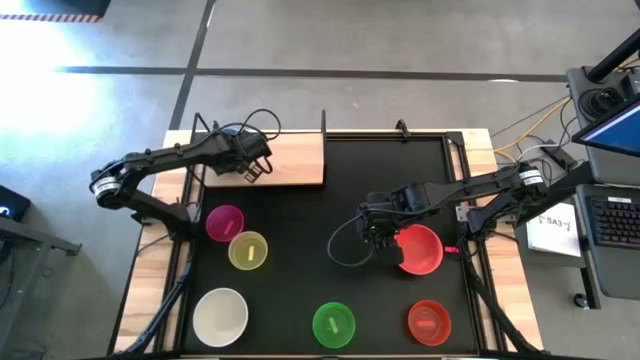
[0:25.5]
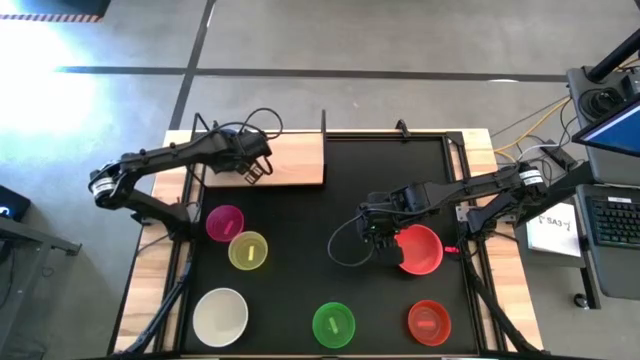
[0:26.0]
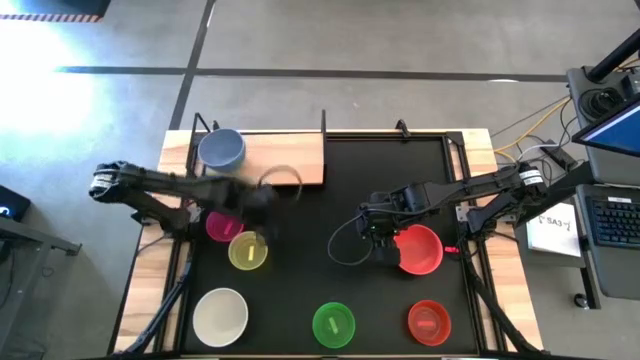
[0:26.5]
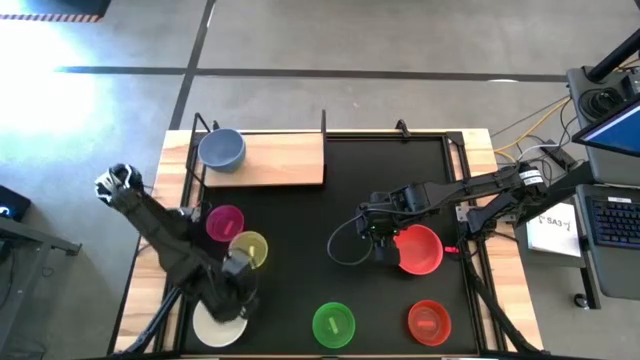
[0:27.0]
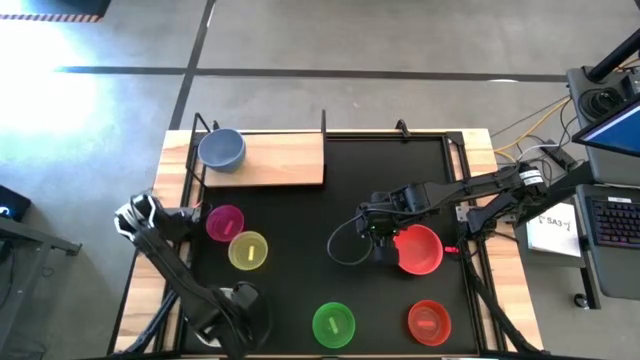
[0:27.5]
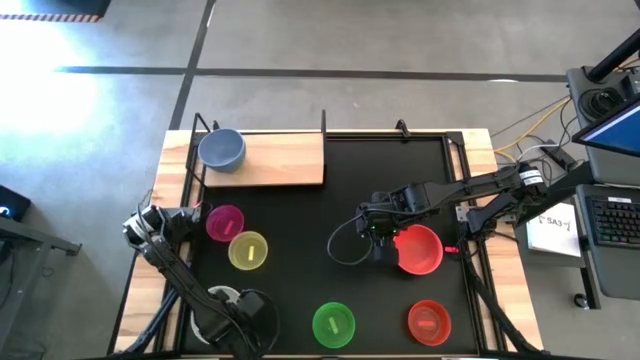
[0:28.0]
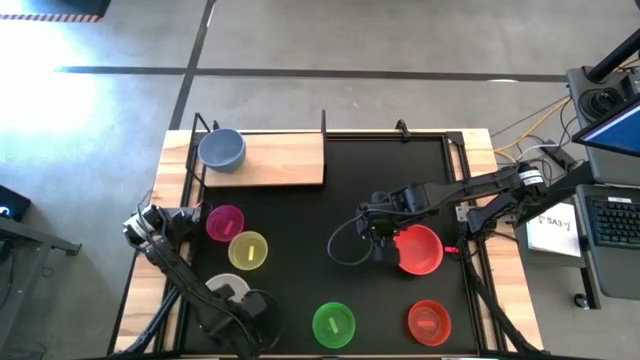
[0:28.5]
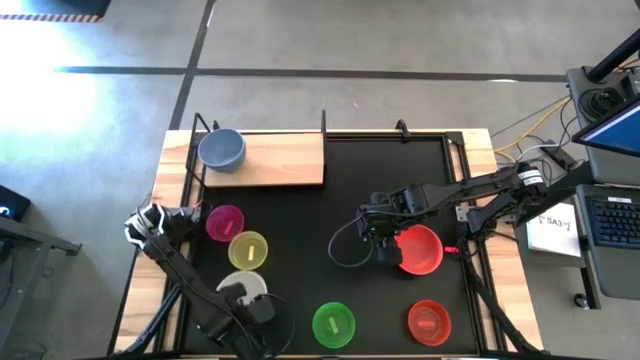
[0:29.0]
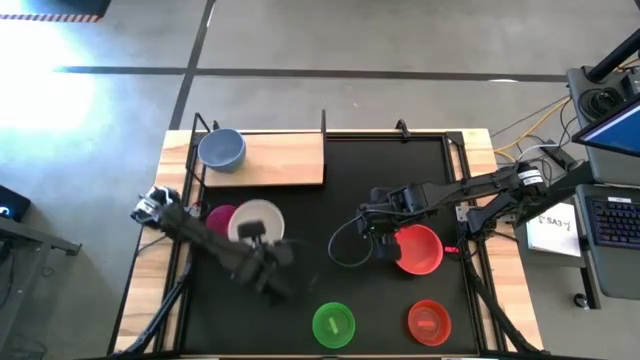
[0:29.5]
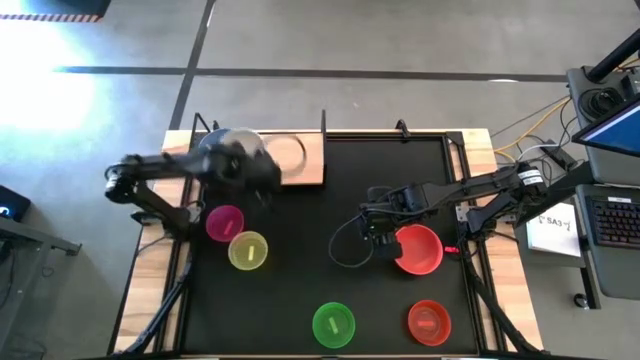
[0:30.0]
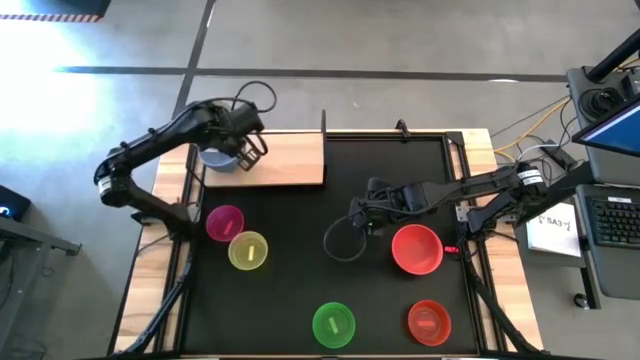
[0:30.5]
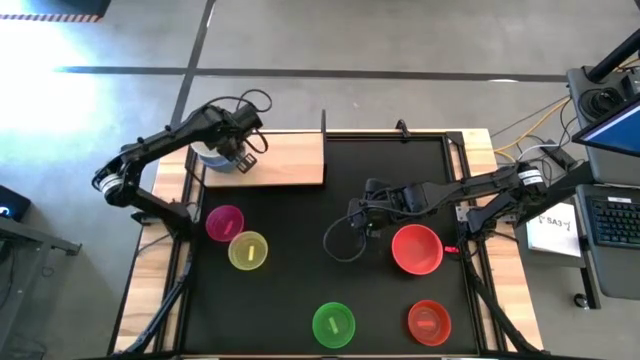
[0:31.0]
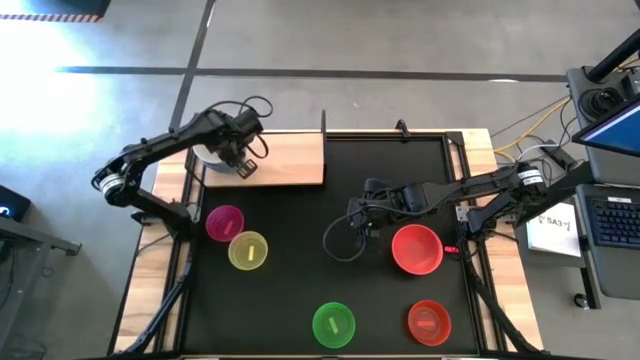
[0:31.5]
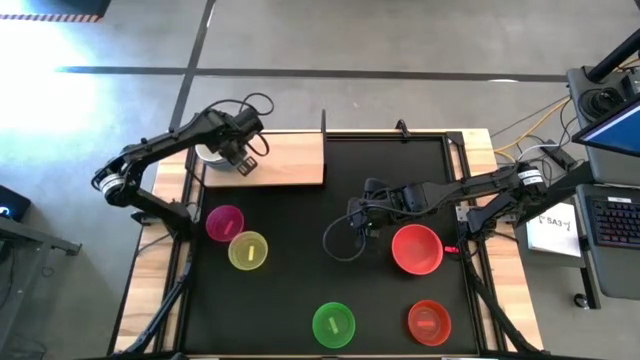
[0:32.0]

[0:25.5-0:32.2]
Task: Place and stack bowls onto a shelf
Stack the white bowl on the blue bowl on the shelf

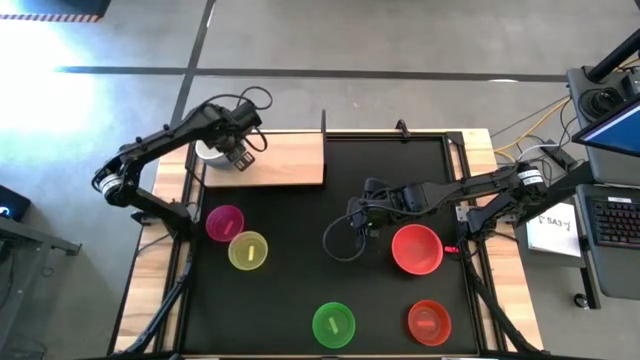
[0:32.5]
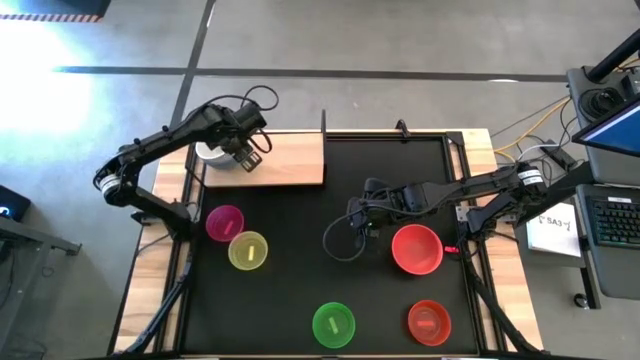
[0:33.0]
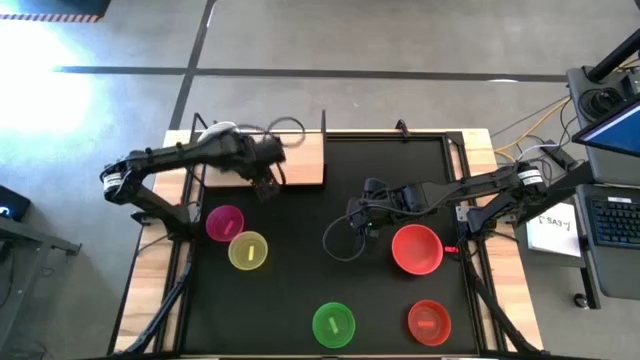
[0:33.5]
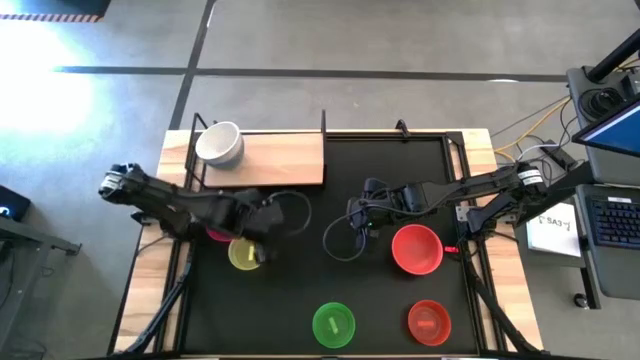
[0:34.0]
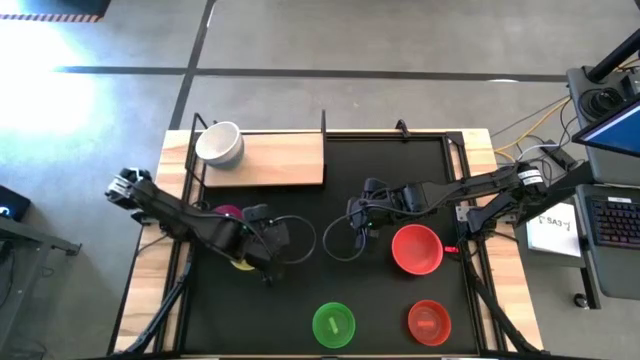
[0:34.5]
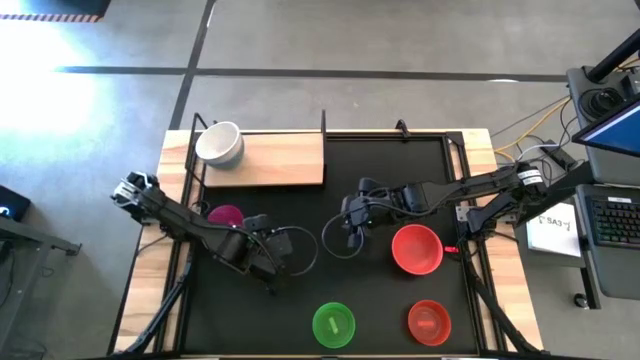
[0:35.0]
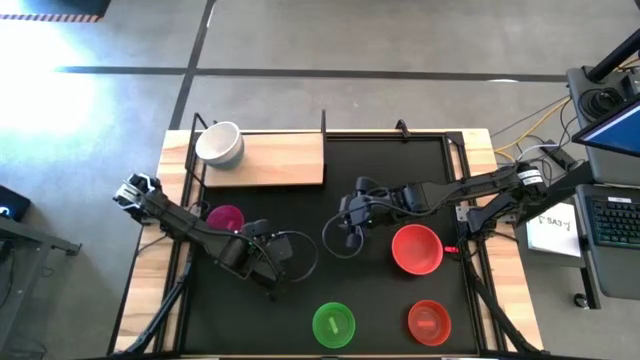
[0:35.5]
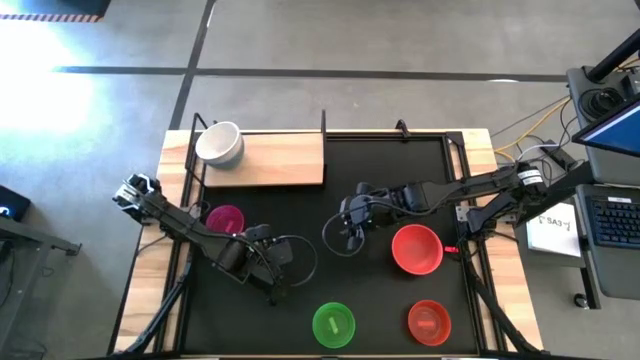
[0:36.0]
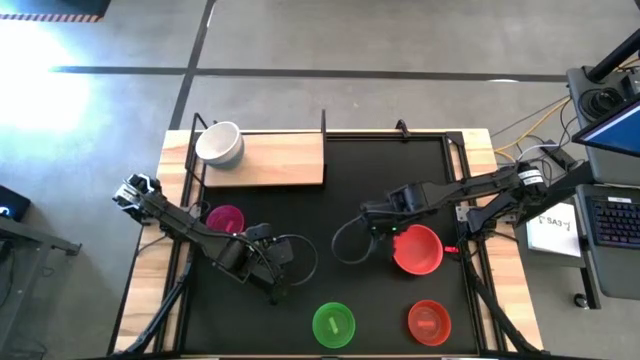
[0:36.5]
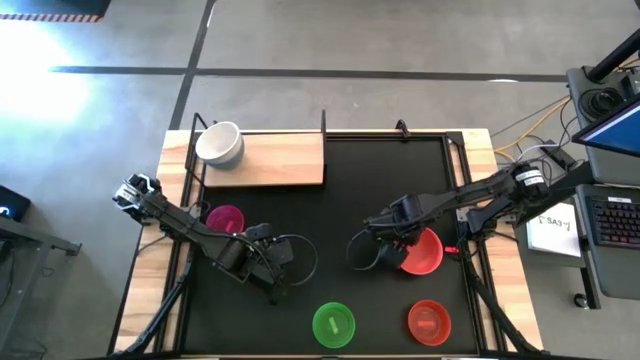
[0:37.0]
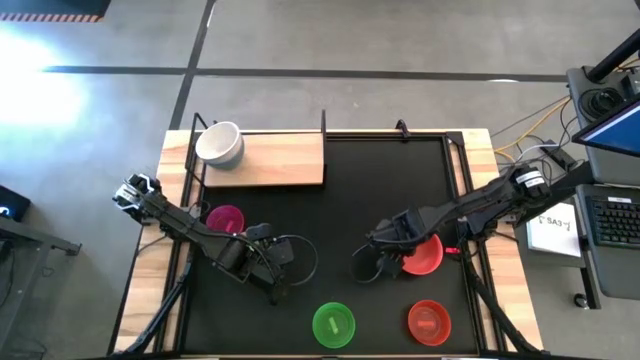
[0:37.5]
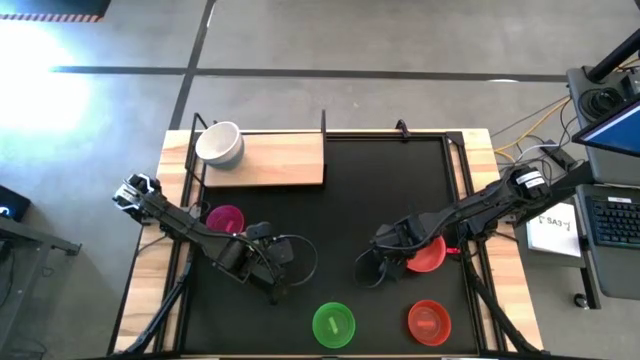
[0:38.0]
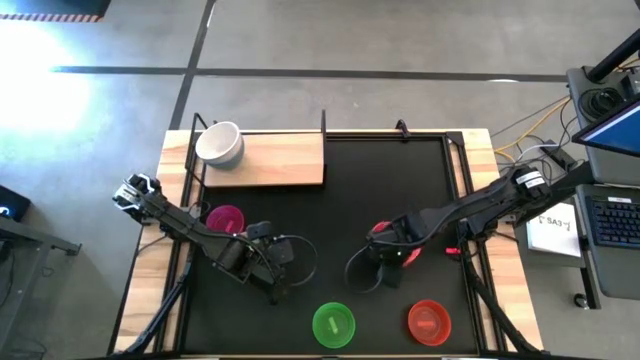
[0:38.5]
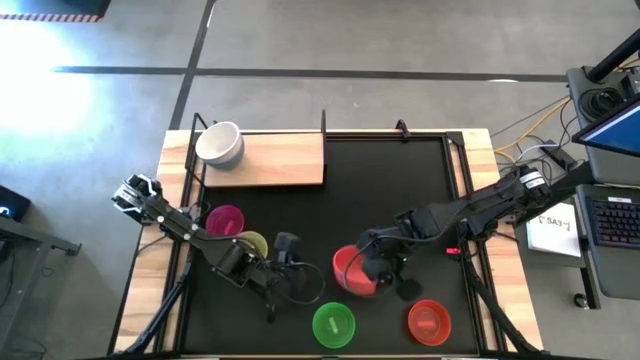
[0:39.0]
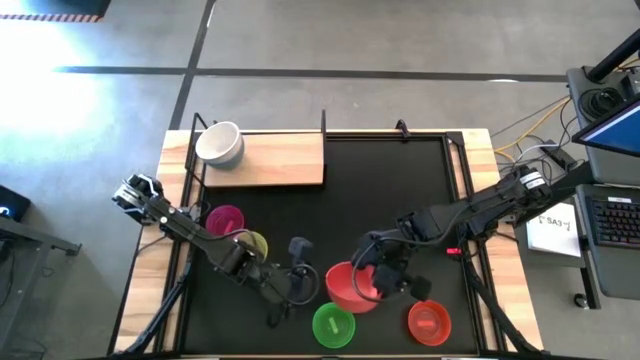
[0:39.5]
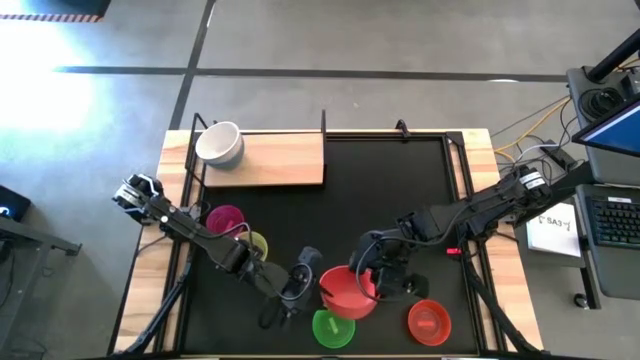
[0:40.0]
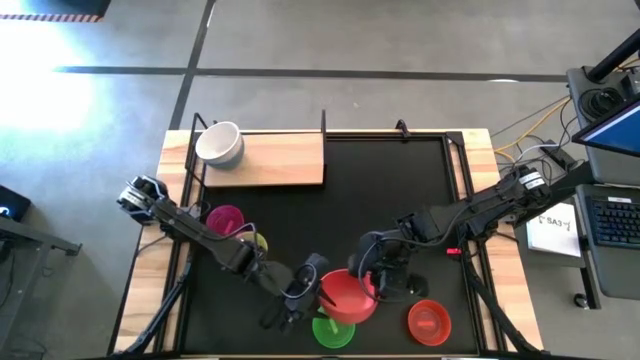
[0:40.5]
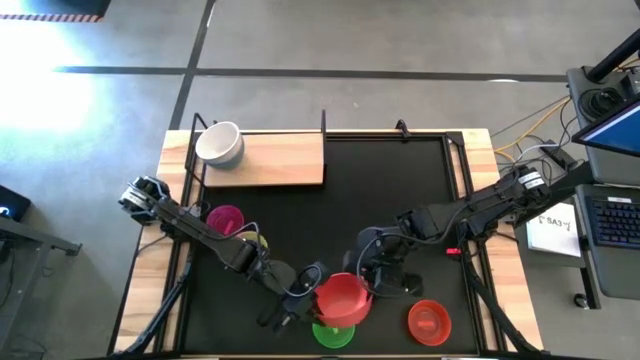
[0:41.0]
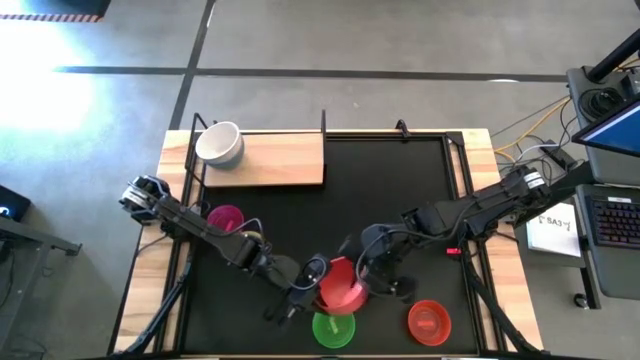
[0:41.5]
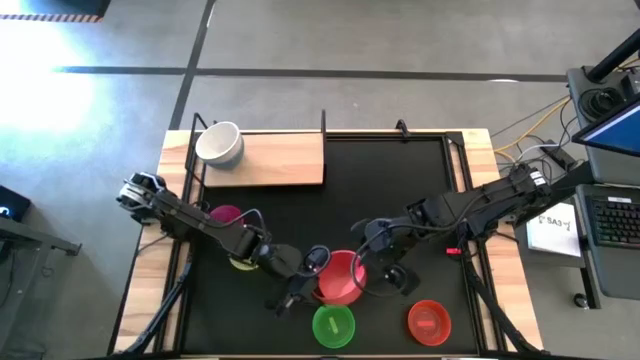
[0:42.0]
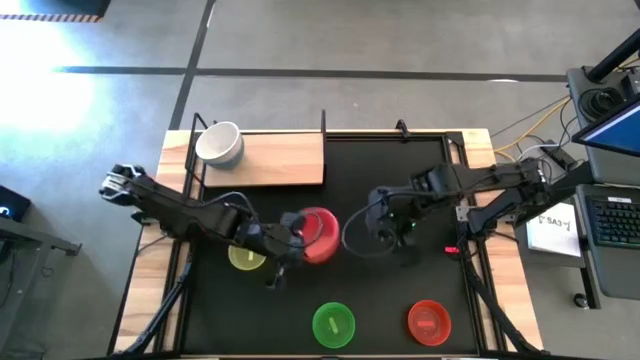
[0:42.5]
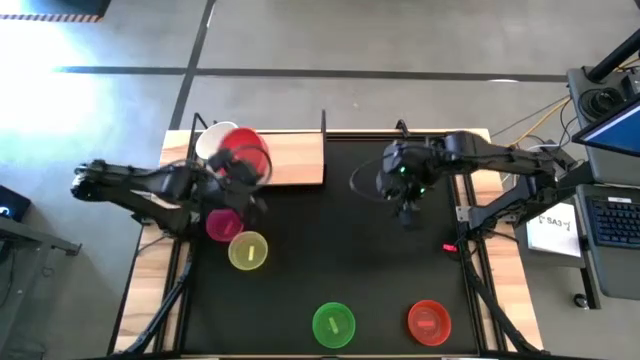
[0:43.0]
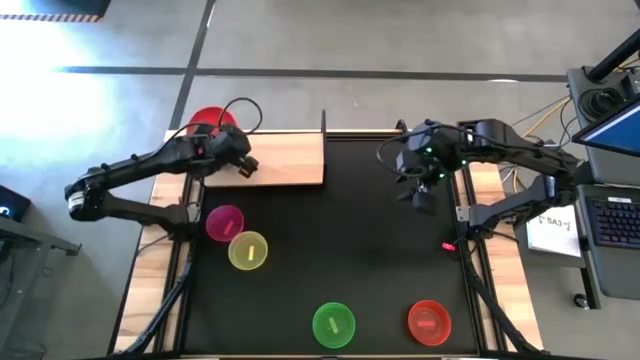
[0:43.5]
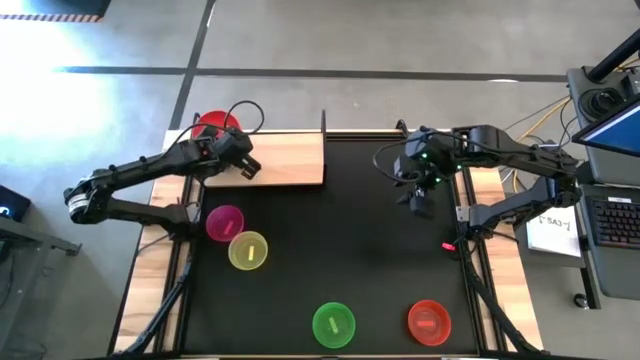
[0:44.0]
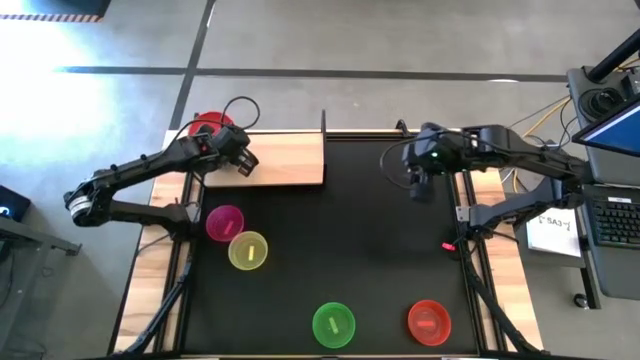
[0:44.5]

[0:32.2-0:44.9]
Stack the orange bowl on the white bowl on the shelf

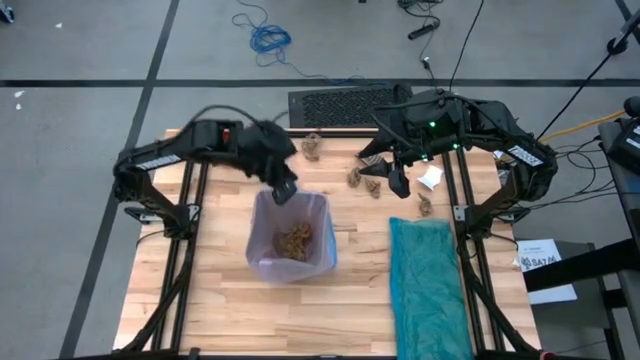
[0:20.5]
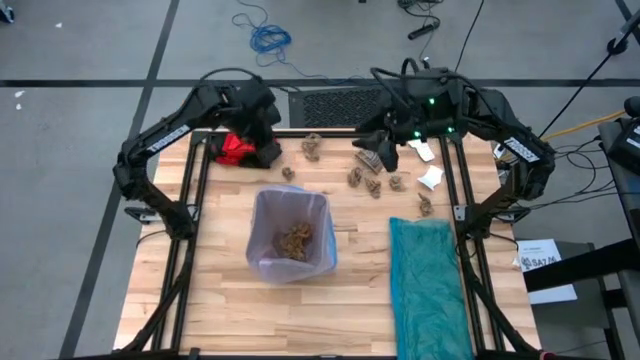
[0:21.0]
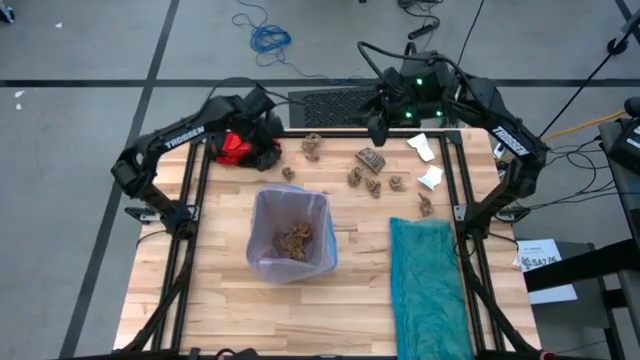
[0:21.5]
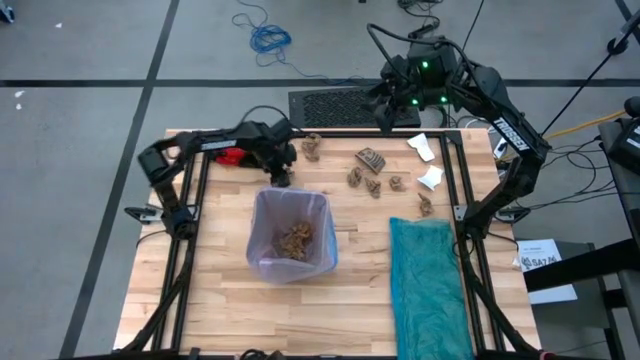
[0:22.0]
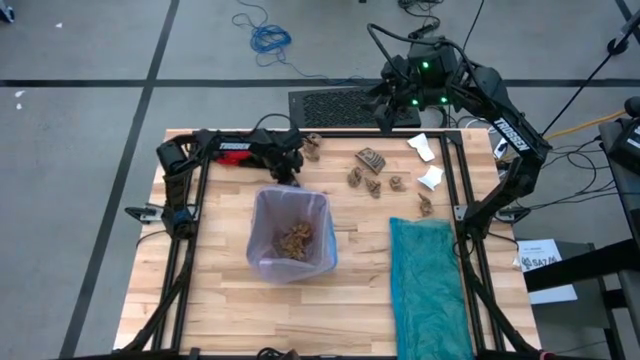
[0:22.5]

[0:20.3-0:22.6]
Task: place trash/remove bag and relplace
Put the brown napkin into the trash bin
